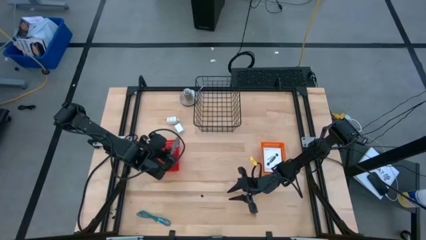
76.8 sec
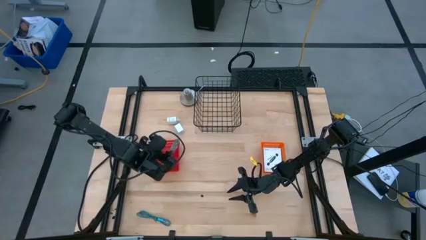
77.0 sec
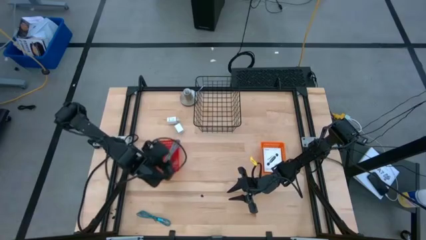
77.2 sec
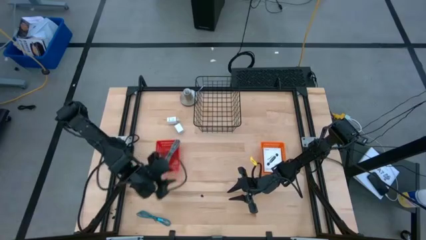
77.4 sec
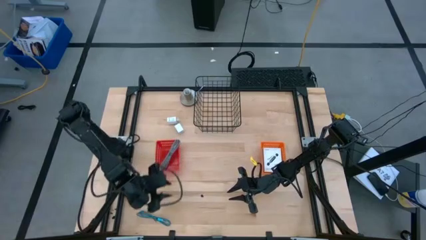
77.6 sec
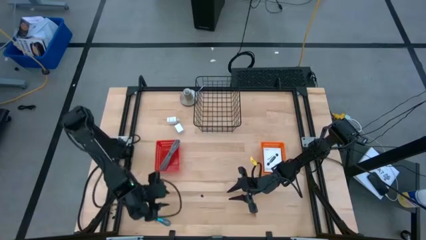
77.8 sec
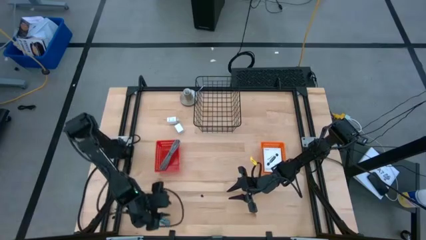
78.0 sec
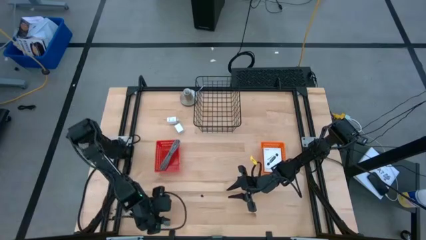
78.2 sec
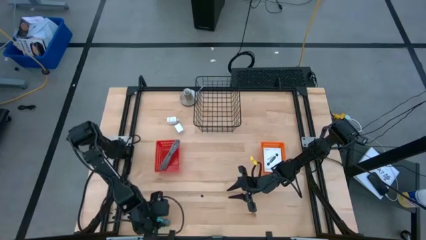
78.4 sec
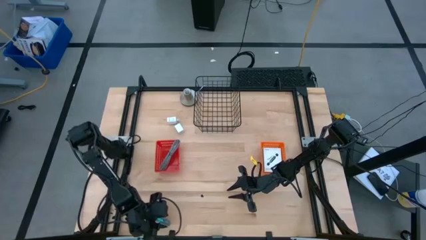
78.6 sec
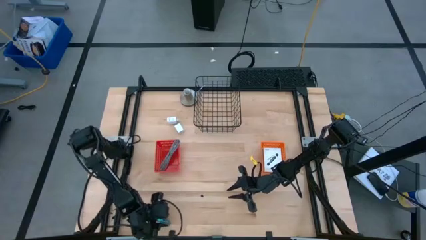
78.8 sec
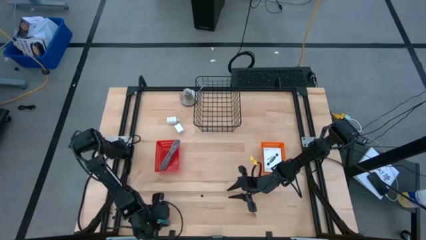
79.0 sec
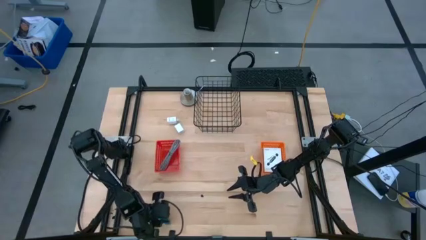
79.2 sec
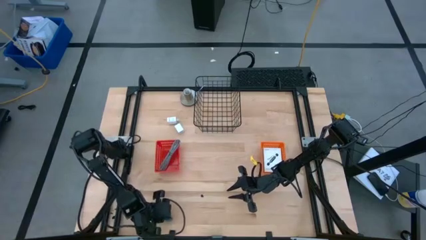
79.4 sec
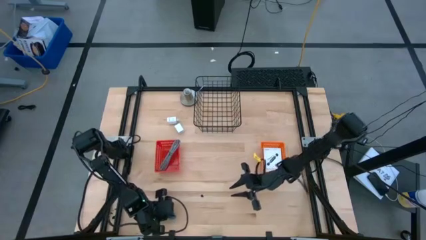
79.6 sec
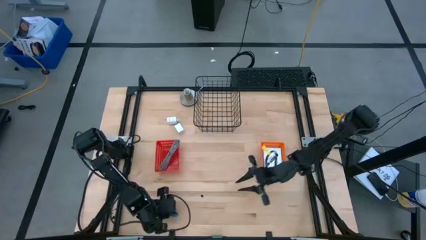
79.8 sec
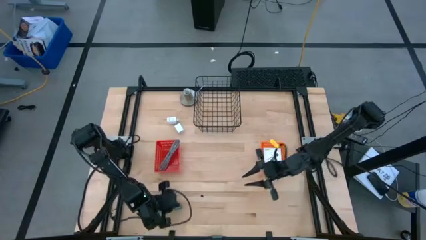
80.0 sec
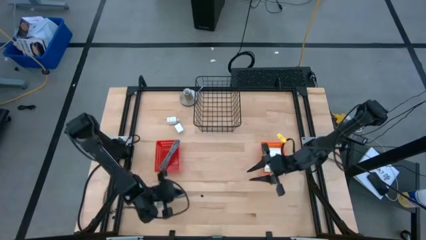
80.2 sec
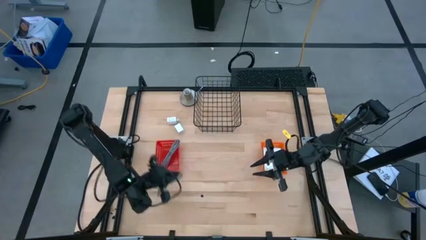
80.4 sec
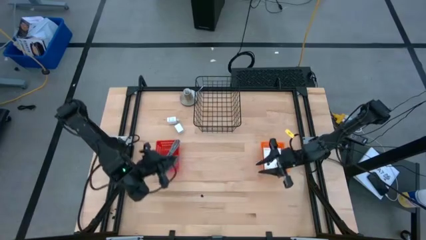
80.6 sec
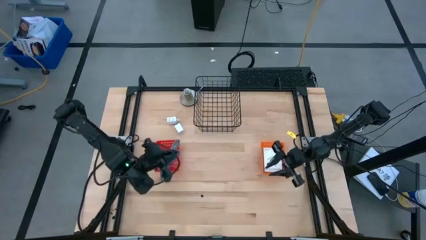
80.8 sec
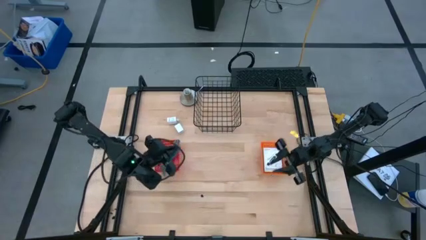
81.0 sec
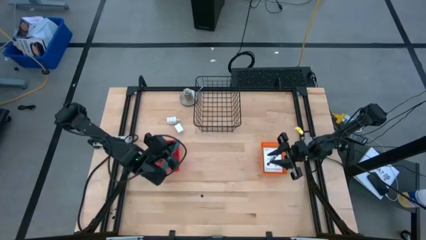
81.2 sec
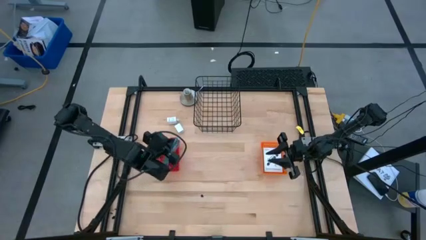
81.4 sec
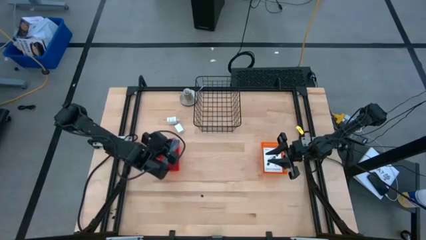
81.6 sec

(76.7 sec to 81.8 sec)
Task: Pick and place items into bin
Put the blue charger cable into the red bin

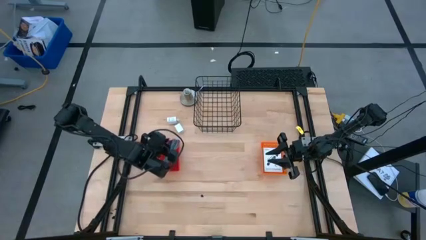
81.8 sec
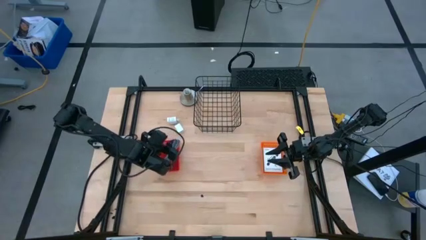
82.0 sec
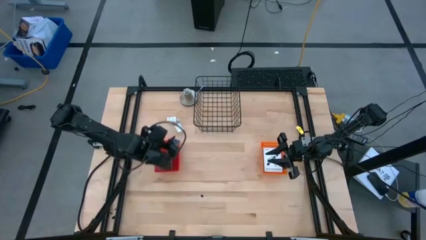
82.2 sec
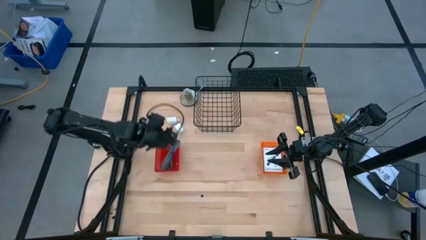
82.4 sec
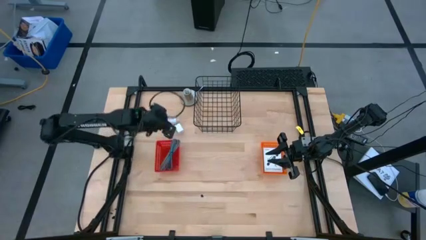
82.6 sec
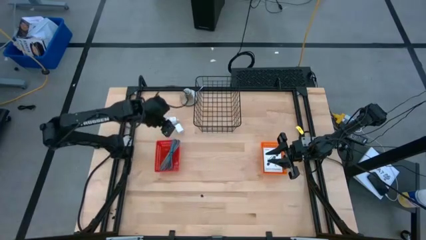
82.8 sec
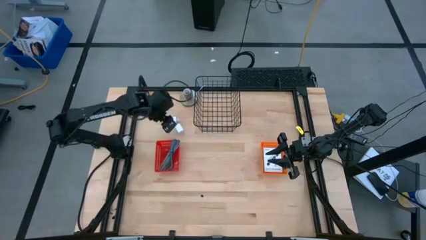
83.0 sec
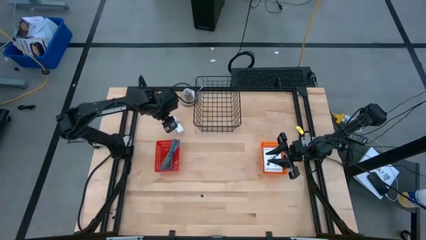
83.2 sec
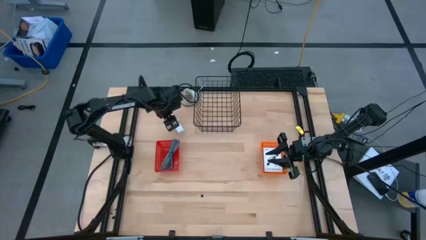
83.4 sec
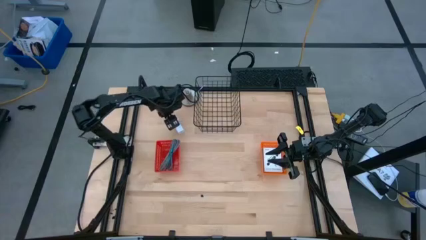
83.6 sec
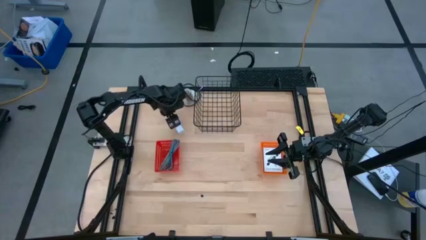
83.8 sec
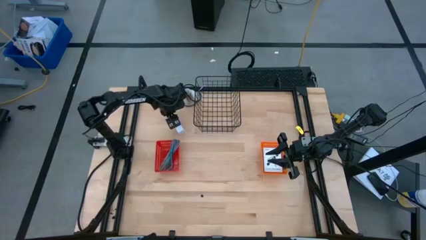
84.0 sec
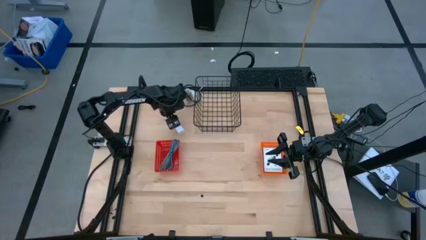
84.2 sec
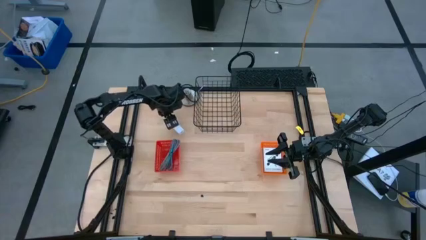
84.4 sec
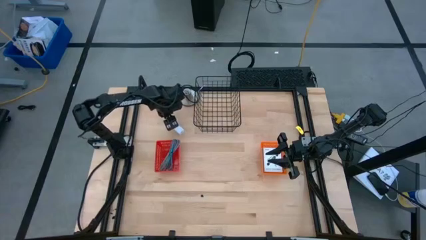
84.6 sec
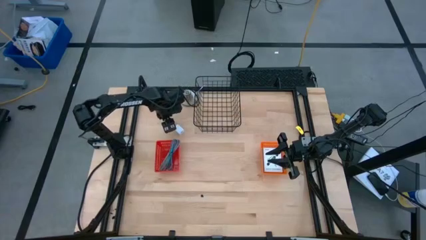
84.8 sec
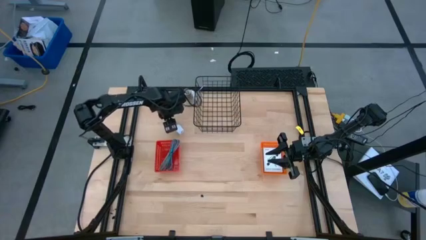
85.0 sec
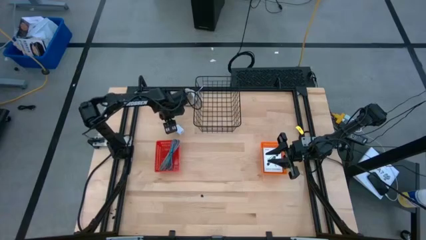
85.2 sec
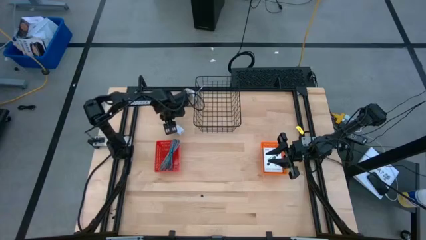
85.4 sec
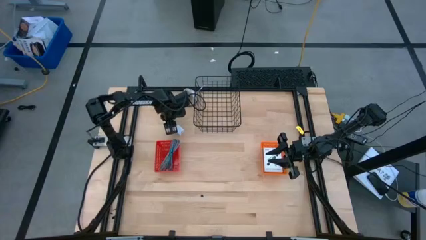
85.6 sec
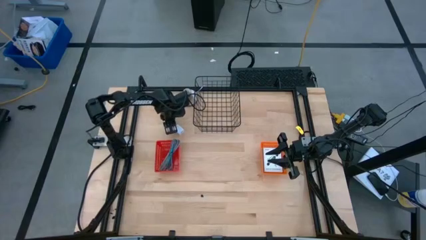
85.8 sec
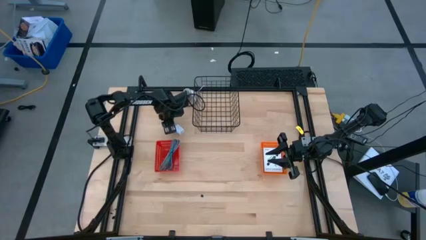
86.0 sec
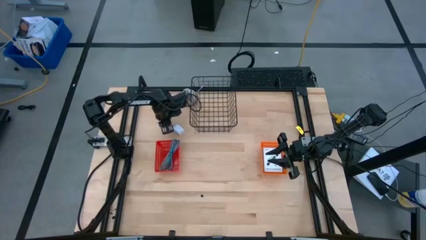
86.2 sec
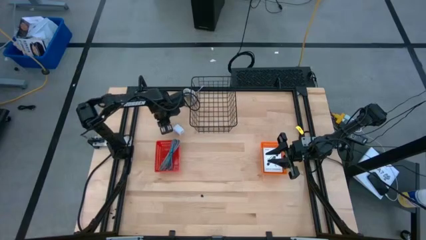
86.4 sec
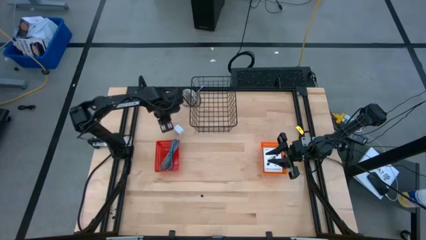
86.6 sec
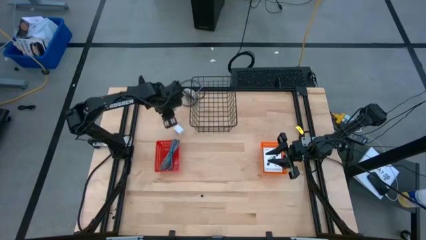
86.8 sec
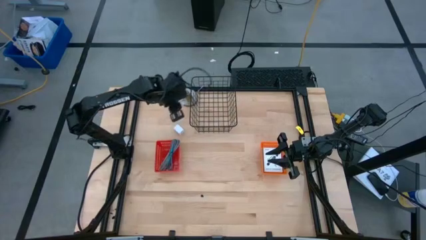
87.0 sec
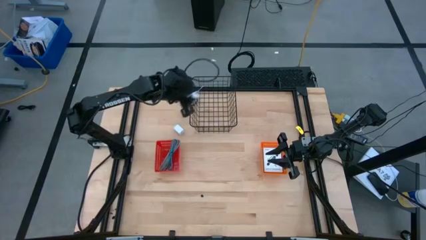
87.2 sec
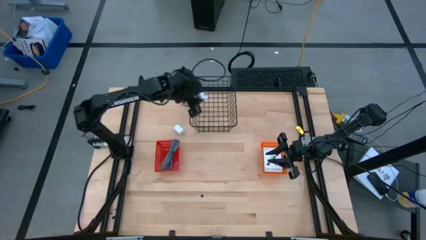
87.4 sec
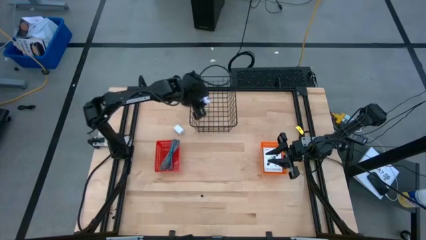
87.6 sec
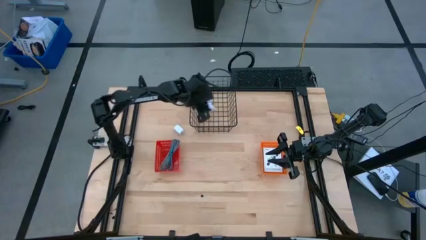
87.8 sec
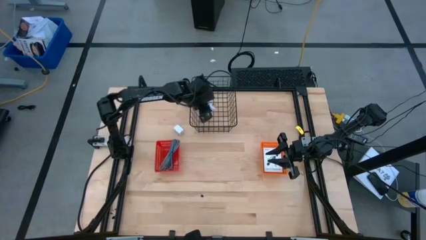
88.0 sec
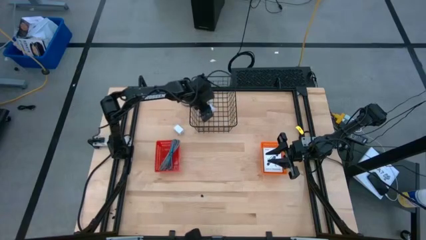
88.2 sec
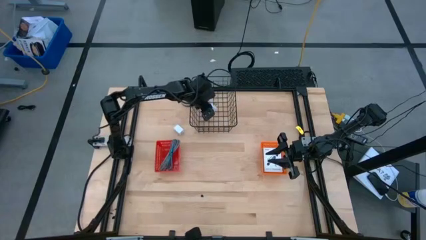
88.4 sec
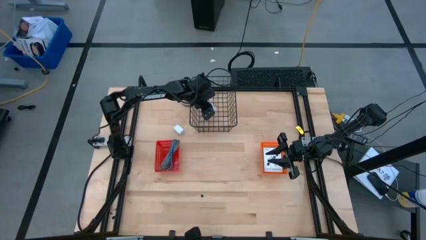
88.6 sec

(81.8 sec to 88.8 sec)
Put the top white charger adapter into the black wire basket

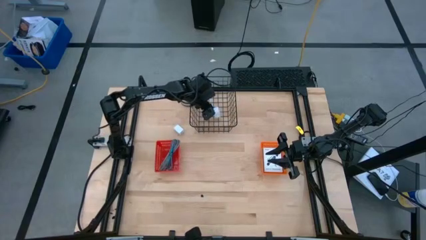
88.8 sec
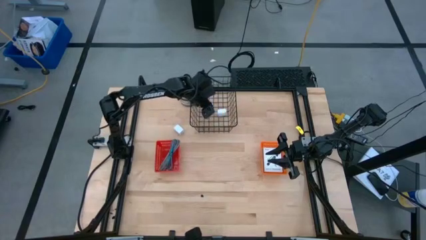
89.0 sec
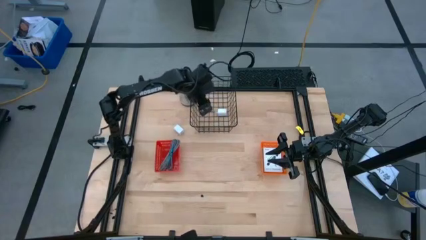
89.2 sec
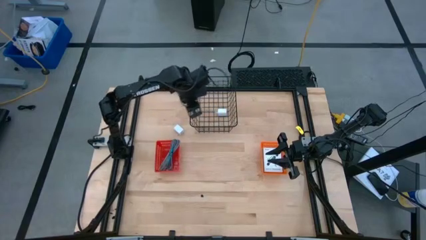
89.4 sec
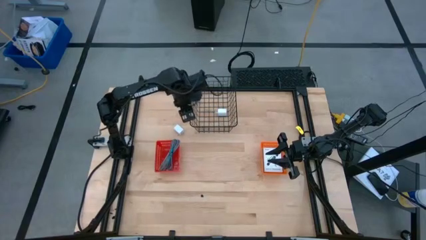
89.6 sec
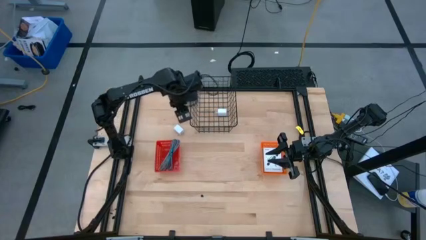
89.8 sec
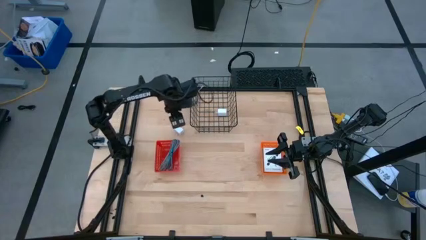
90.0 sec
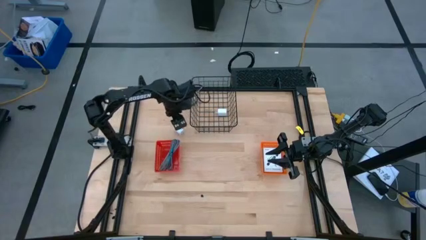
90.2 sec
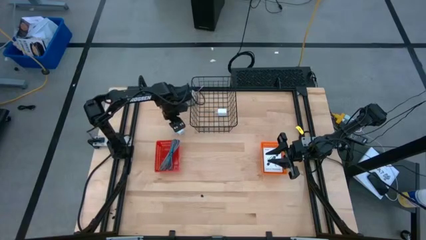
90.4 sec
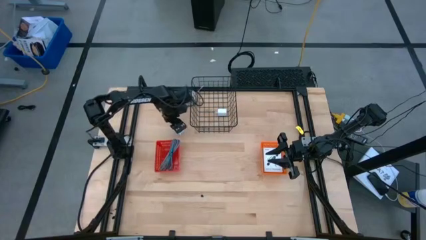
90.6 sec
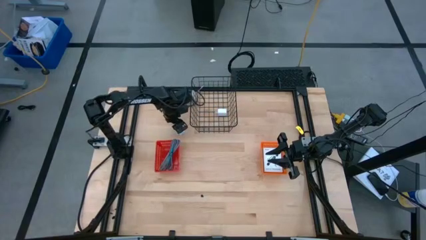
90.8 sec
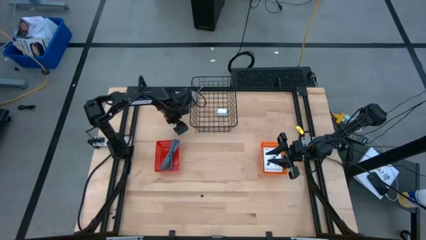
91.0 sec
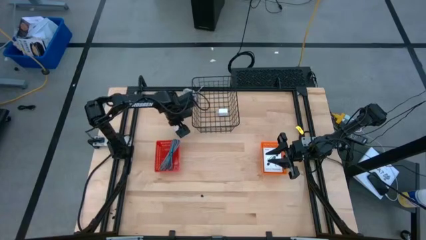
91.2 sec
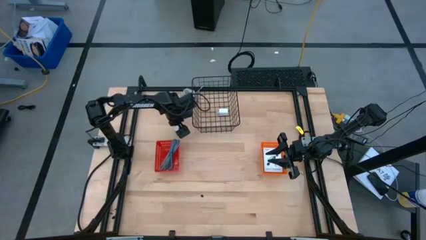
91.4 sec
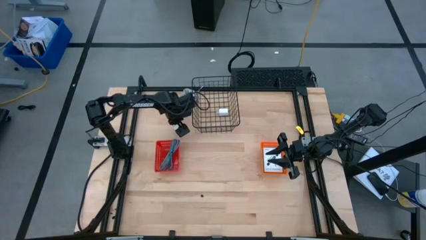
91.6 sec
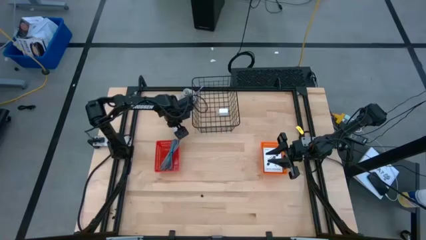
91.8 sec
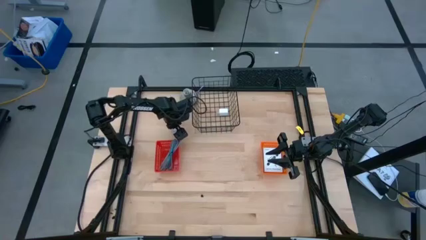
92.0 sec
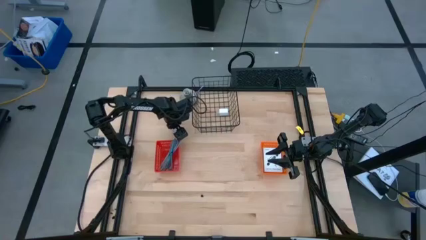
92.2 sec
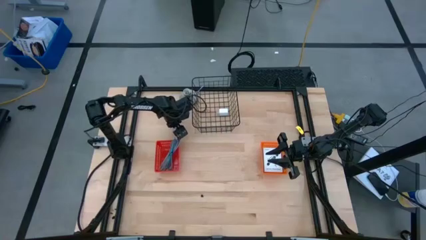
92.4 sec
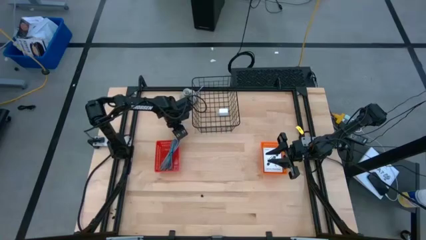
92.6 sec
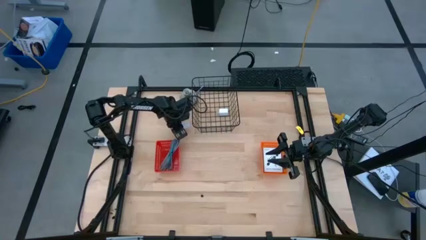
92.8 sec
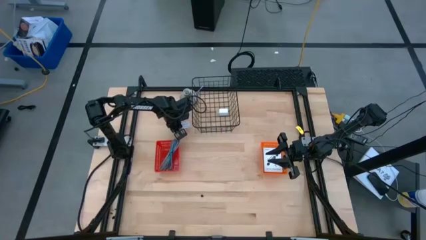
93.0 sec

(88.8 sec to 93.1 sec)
Put the white charger adapter into the black wire basket
